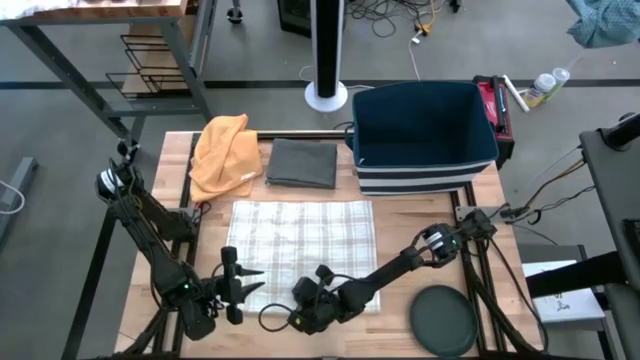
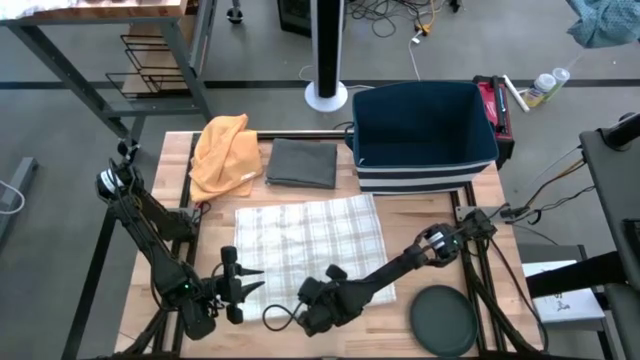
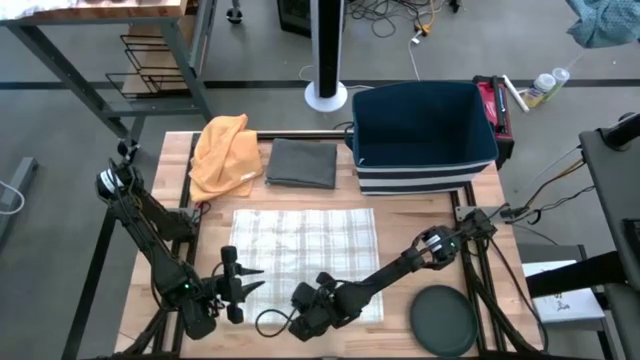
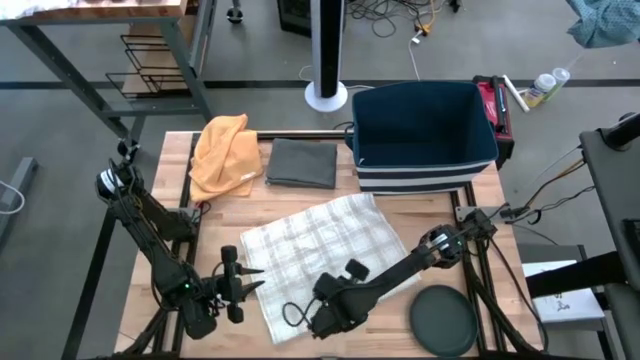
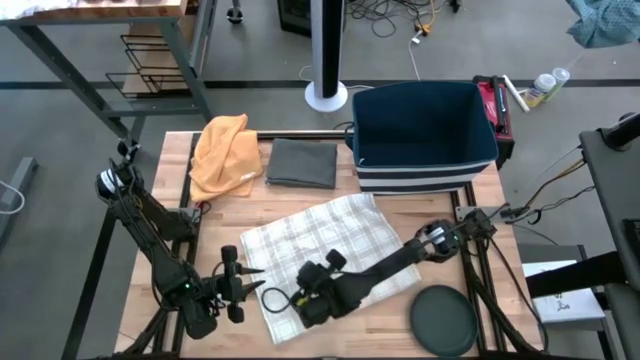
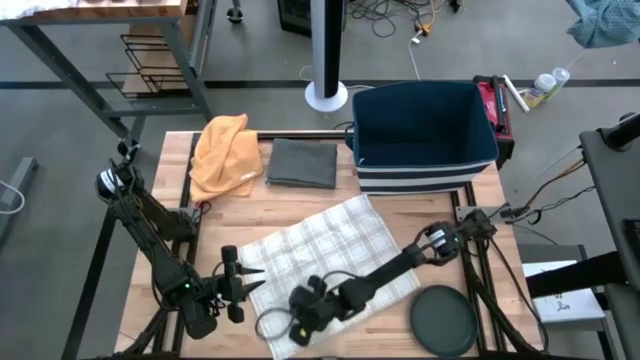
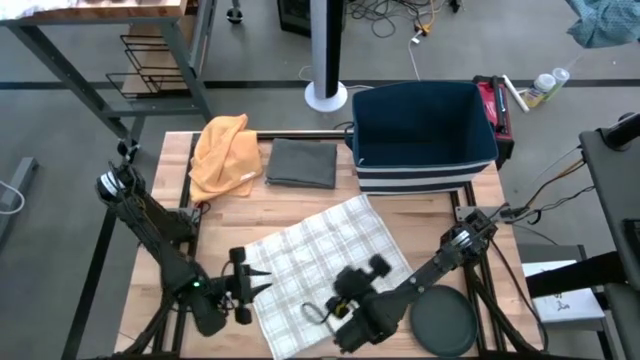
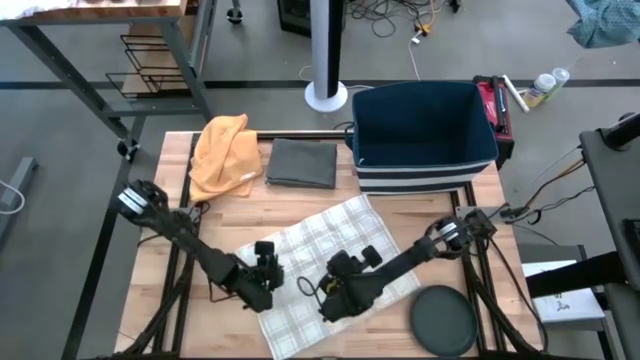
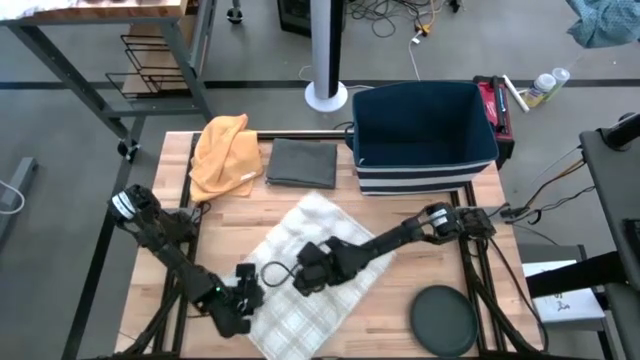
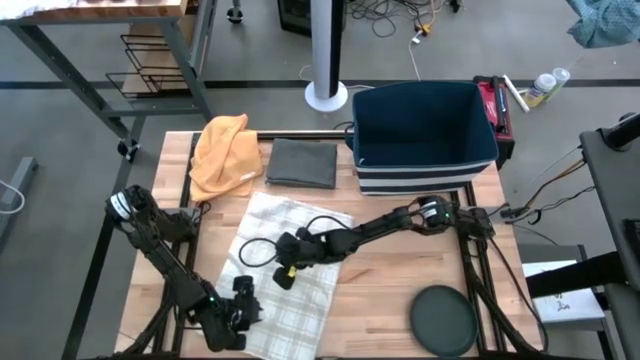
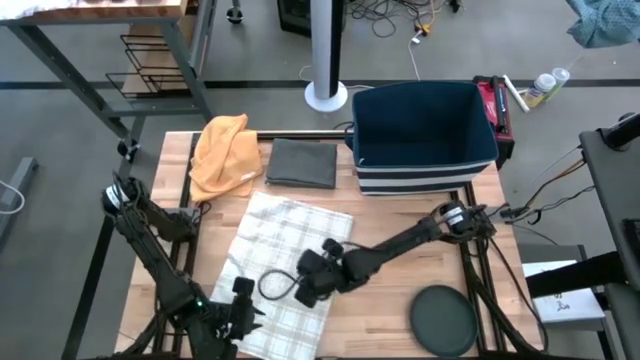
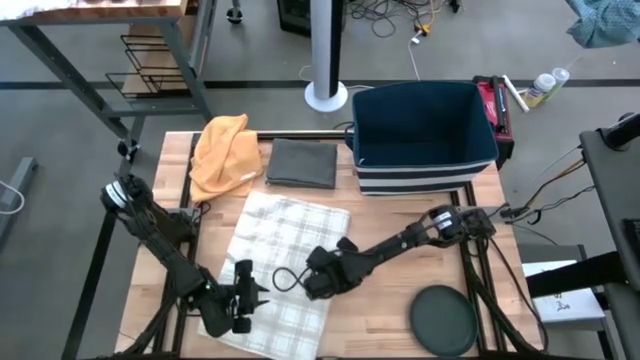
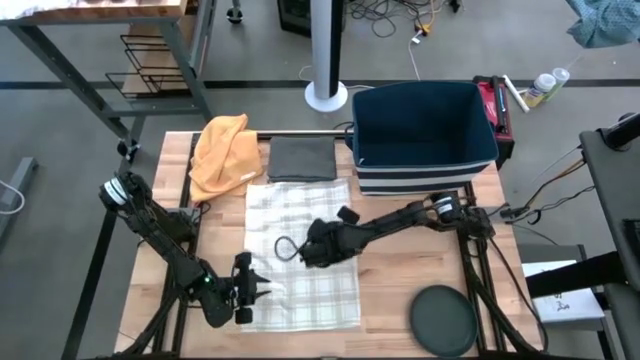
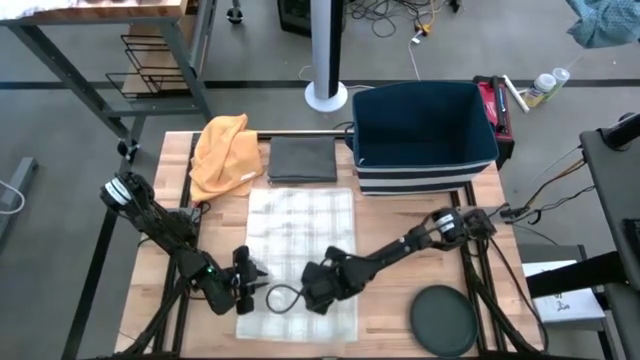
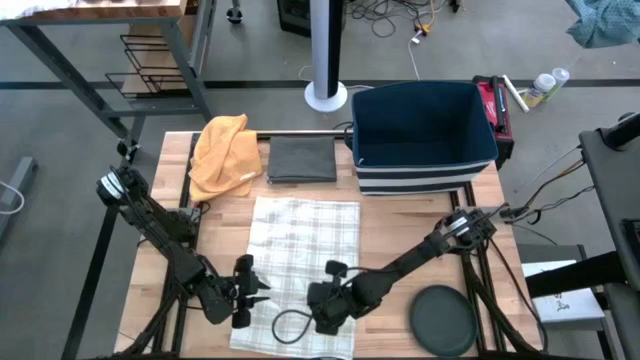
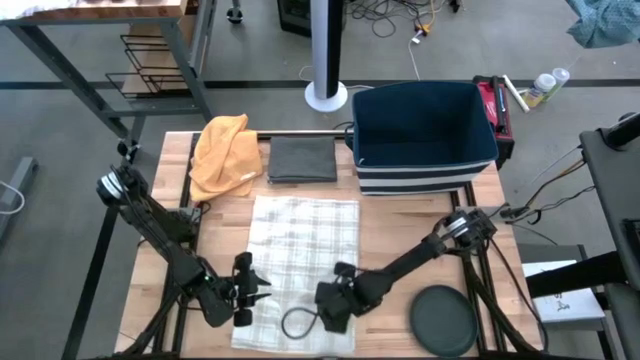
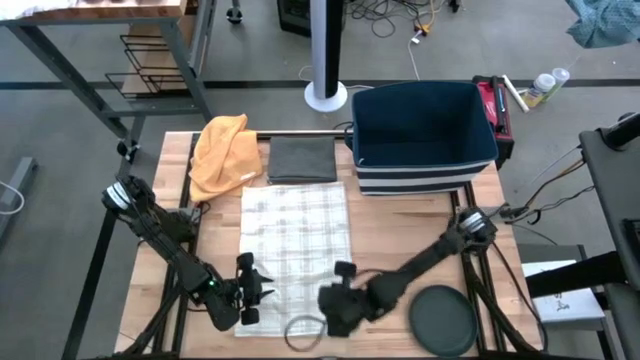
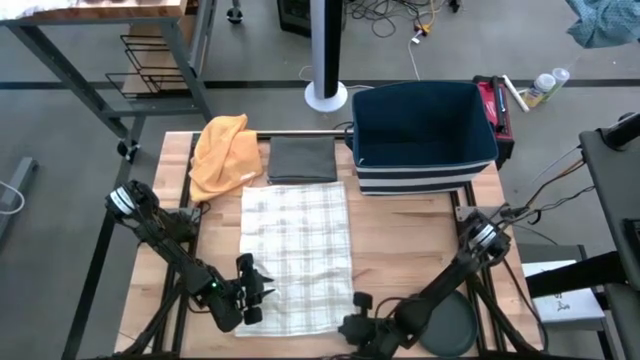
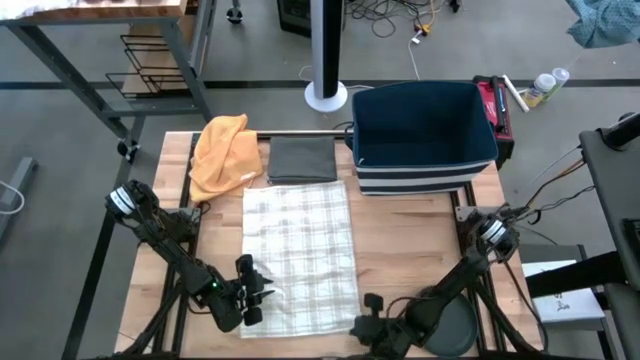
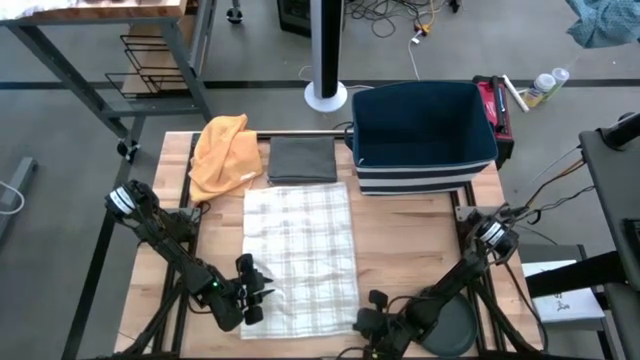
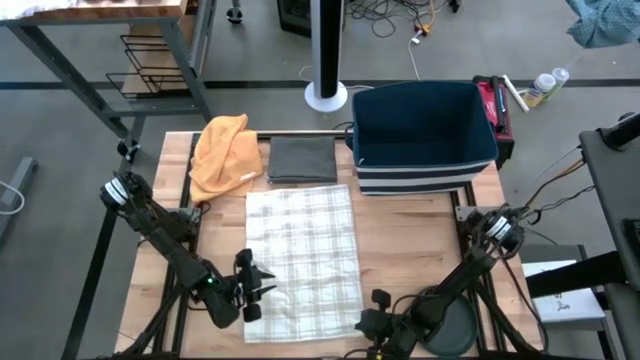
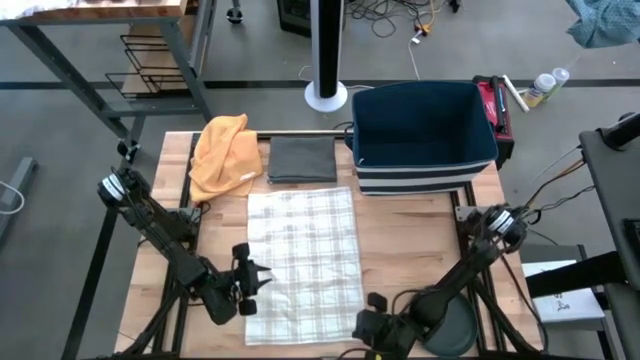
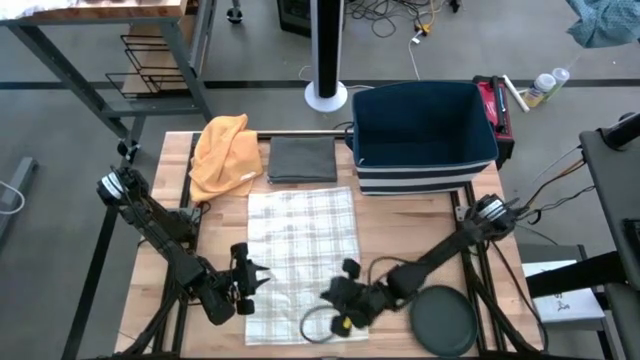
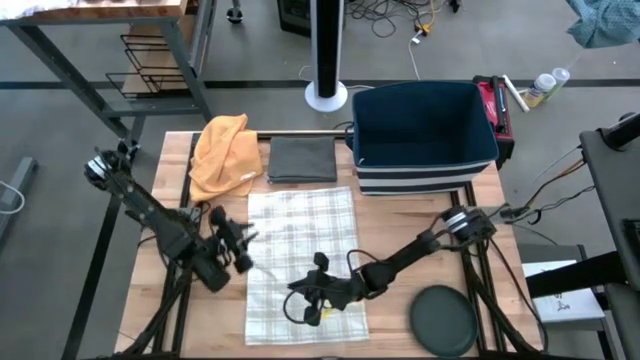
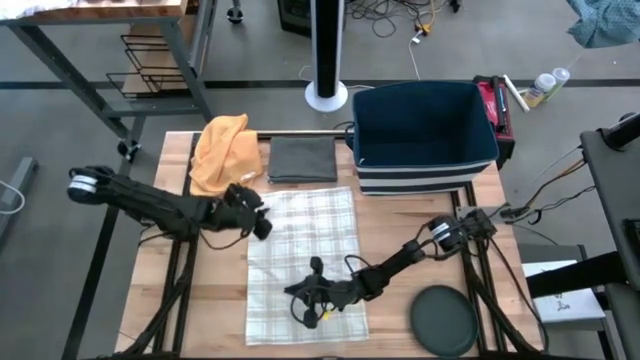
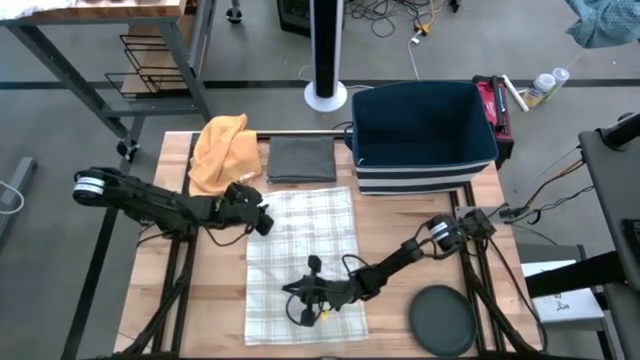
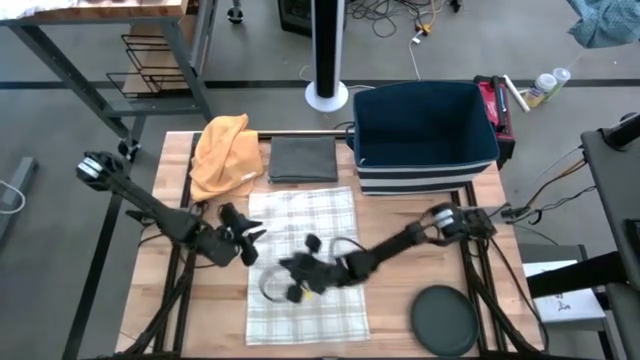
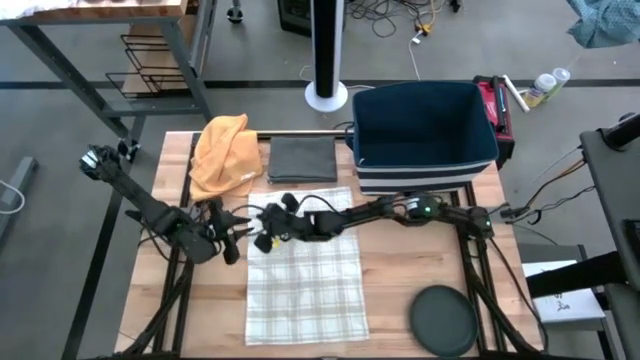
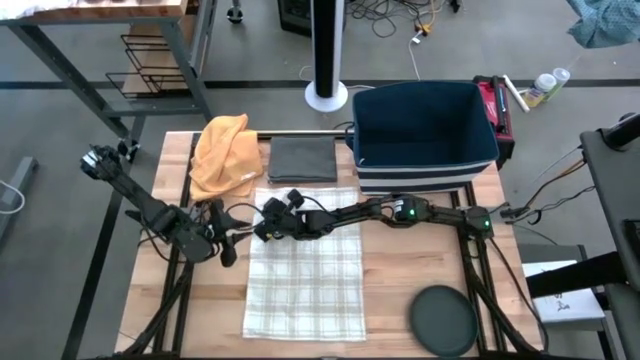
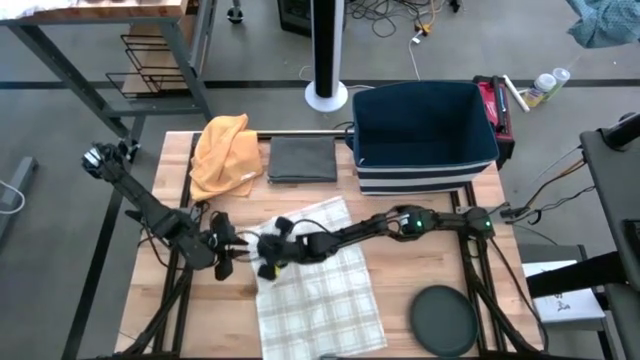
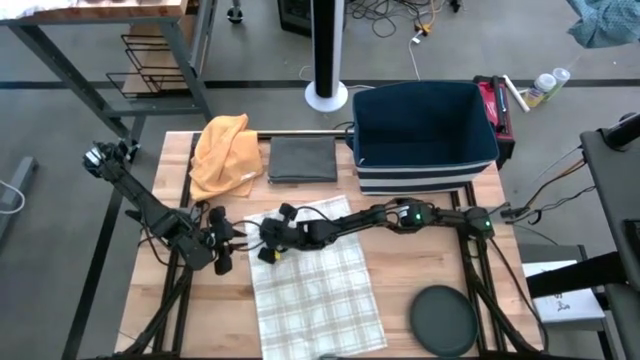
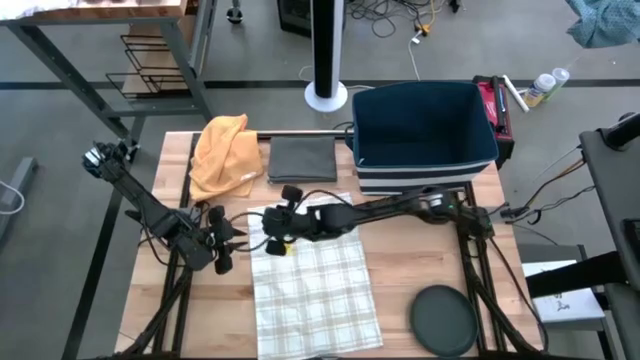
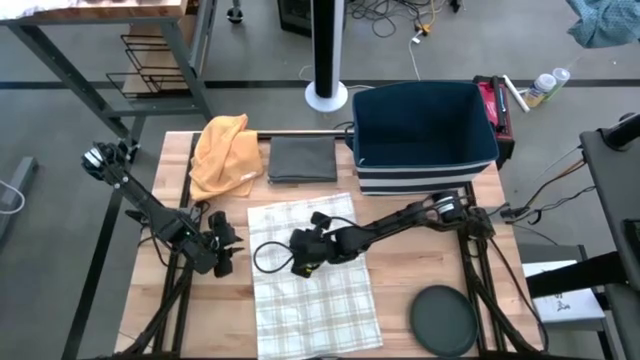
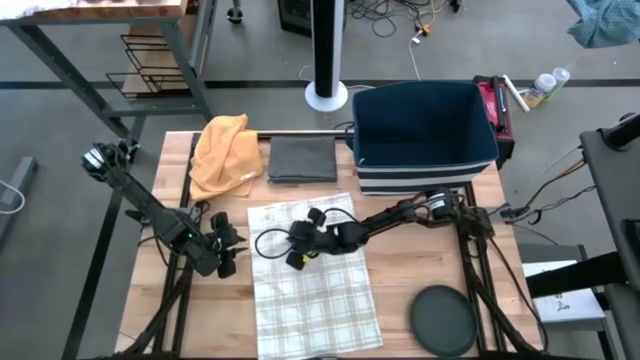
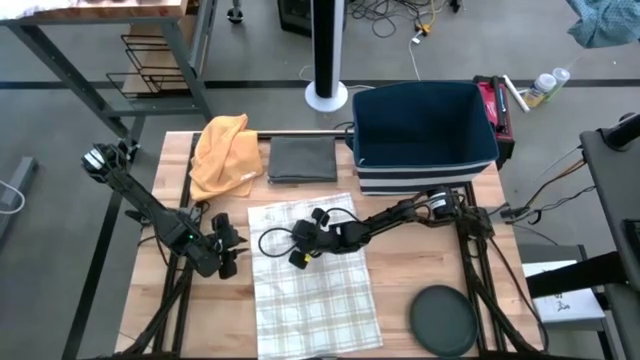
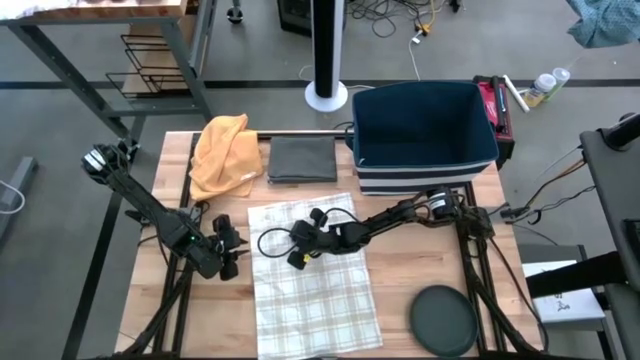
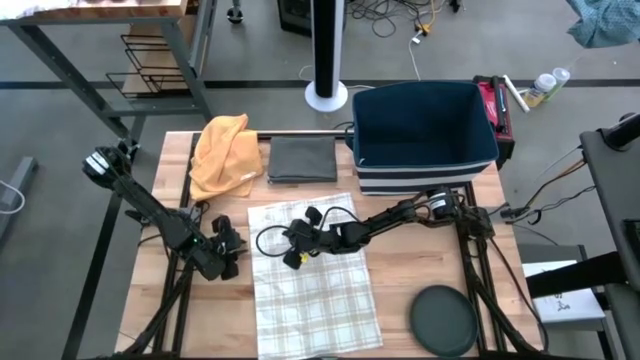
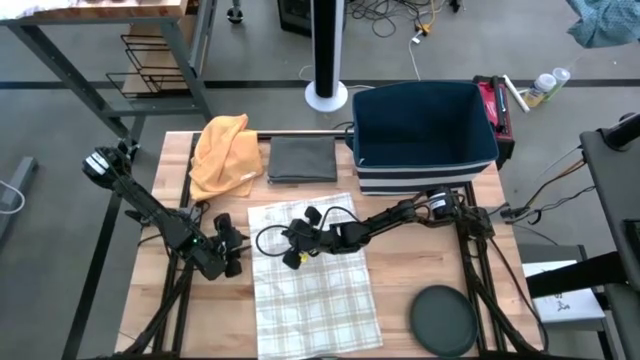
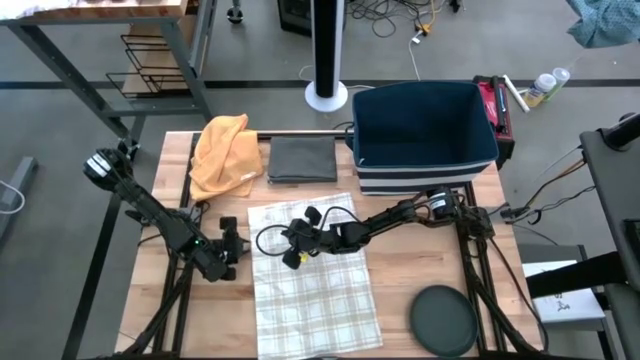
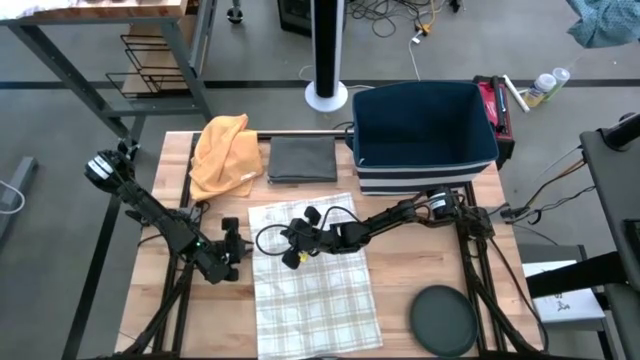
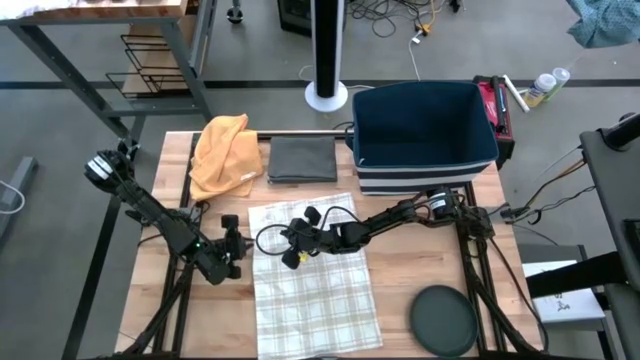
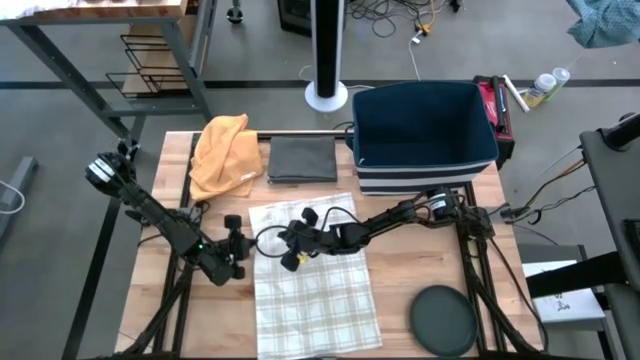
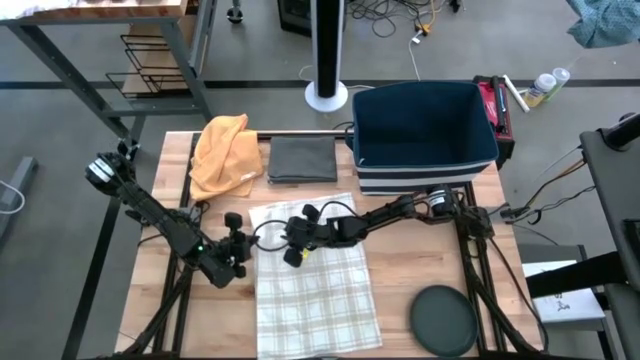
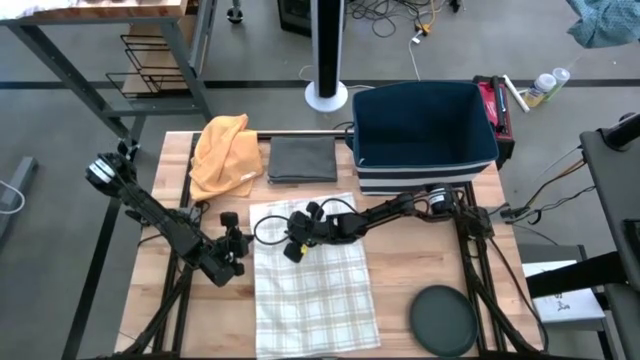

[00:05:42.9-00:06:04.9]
Task: Fold kitchen towel into neat rectangle
Fold the white patterned towel
